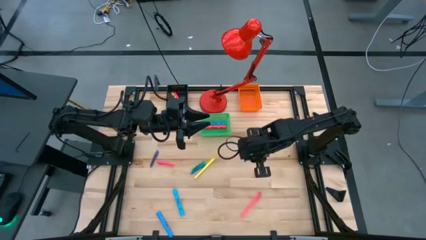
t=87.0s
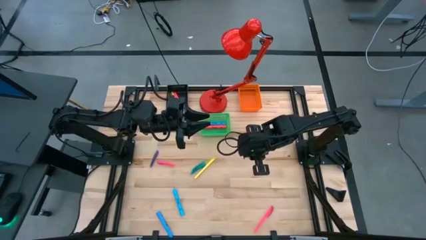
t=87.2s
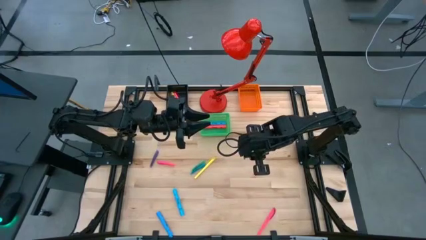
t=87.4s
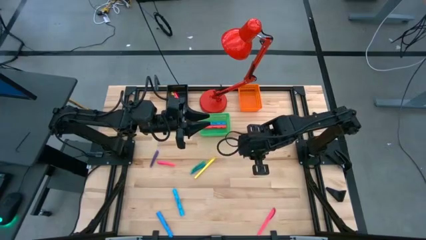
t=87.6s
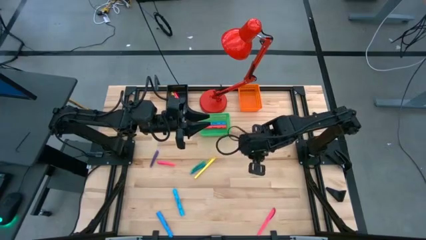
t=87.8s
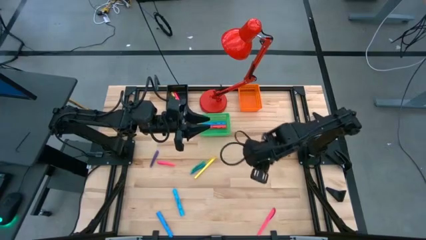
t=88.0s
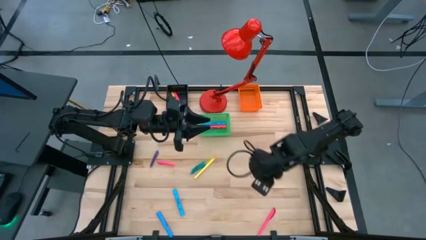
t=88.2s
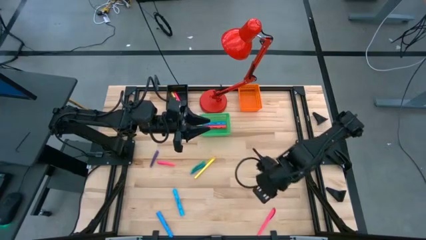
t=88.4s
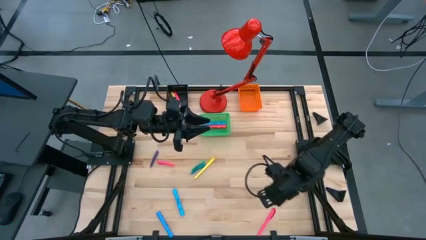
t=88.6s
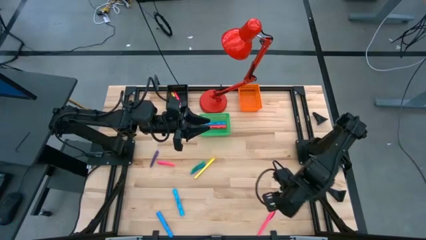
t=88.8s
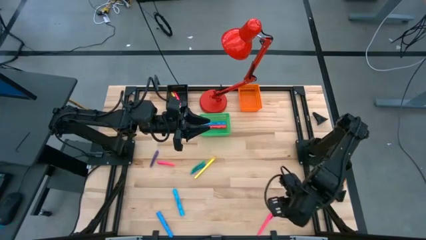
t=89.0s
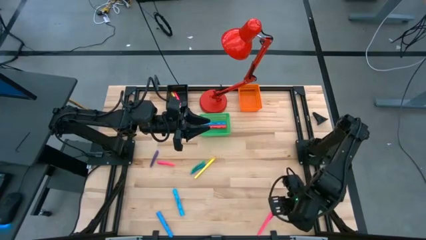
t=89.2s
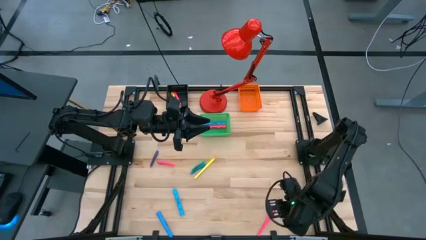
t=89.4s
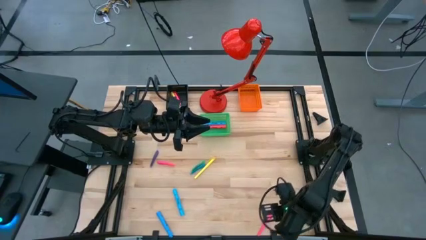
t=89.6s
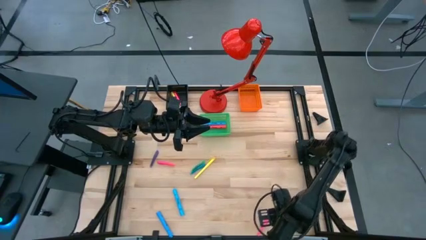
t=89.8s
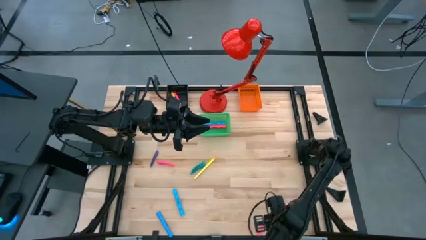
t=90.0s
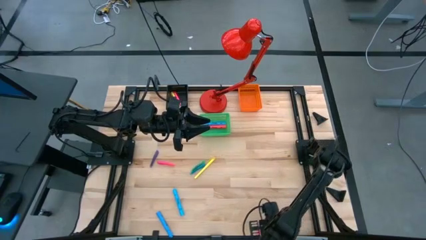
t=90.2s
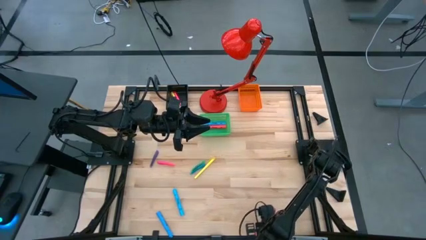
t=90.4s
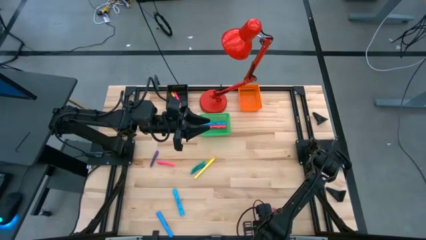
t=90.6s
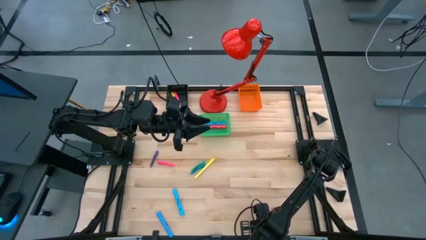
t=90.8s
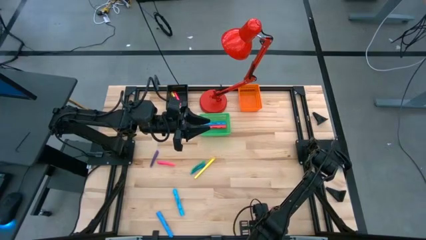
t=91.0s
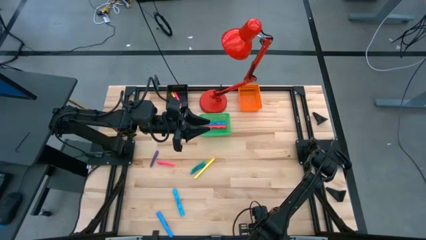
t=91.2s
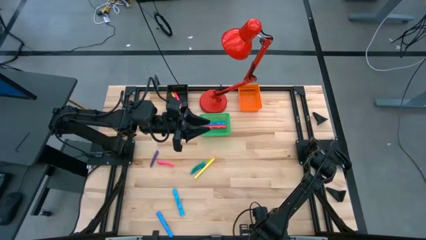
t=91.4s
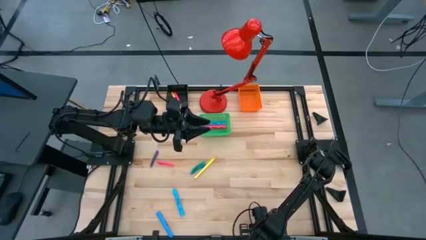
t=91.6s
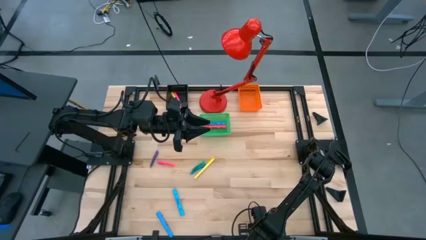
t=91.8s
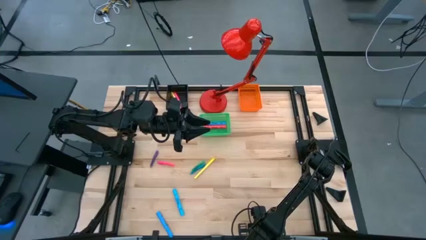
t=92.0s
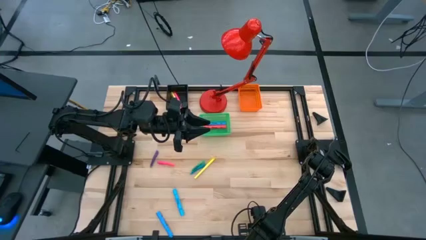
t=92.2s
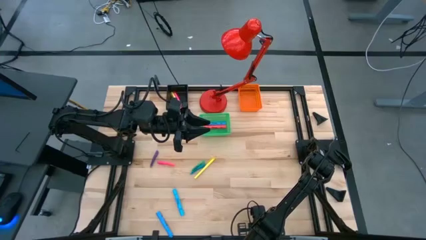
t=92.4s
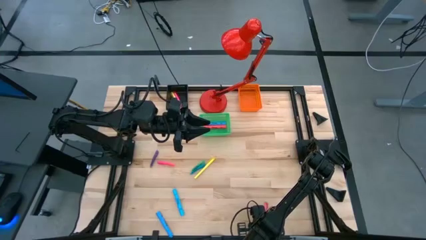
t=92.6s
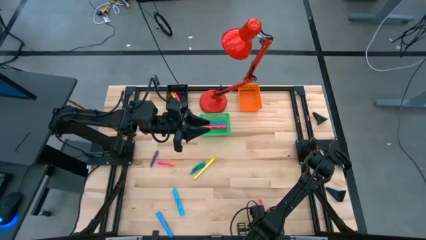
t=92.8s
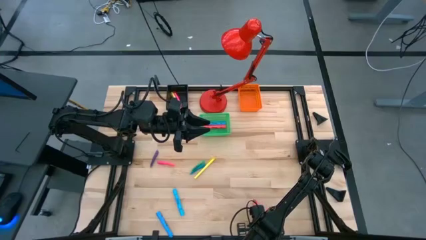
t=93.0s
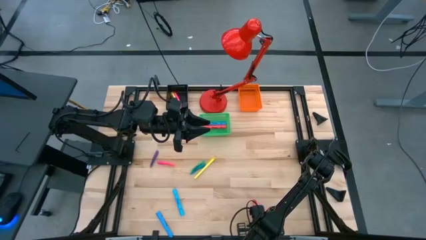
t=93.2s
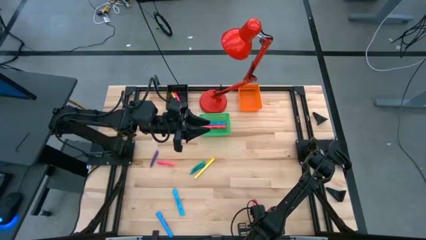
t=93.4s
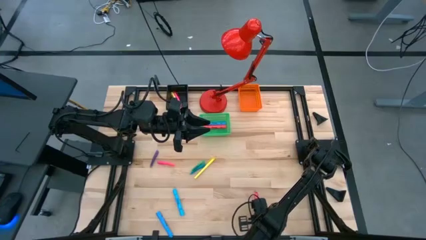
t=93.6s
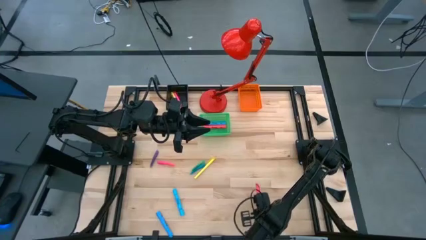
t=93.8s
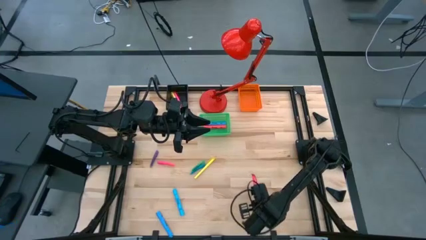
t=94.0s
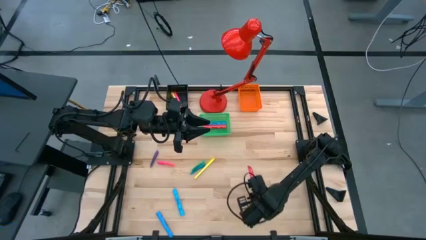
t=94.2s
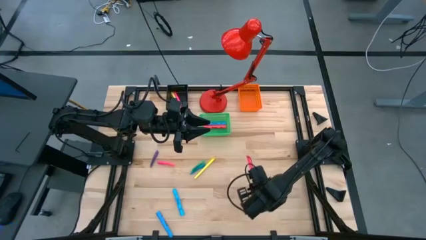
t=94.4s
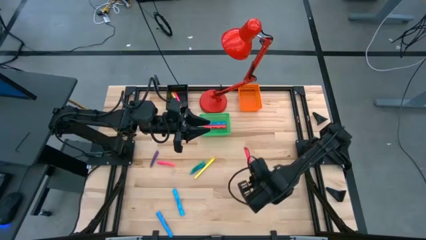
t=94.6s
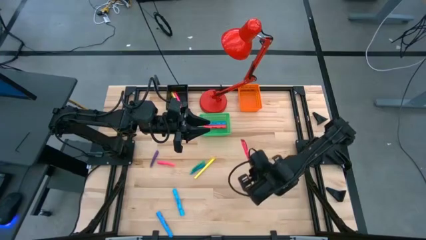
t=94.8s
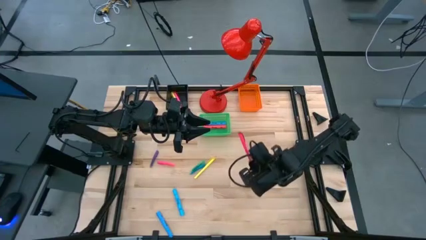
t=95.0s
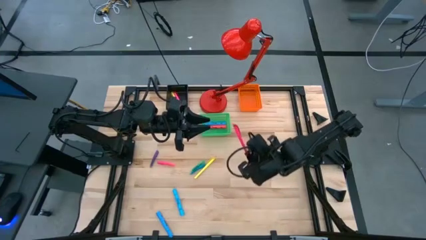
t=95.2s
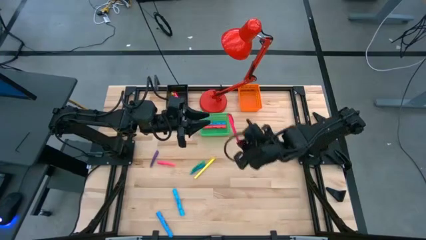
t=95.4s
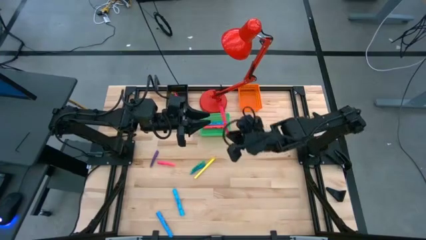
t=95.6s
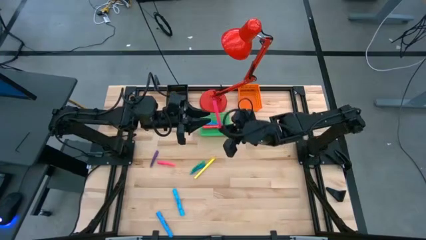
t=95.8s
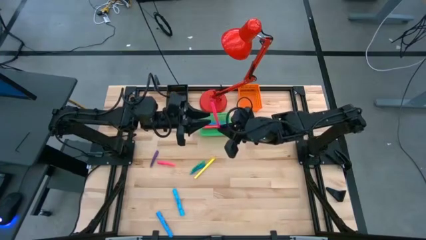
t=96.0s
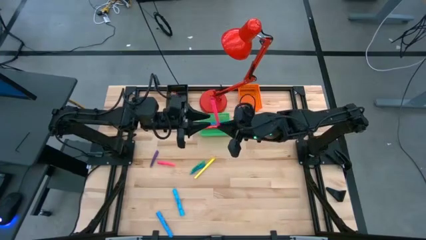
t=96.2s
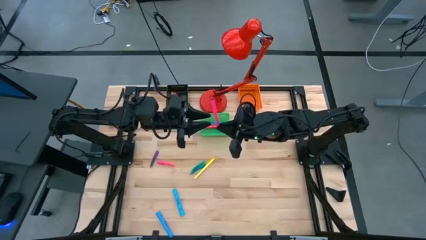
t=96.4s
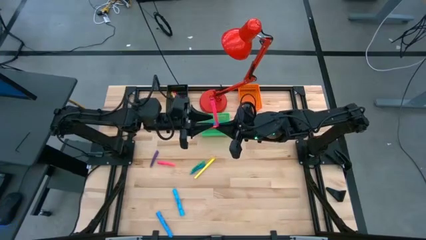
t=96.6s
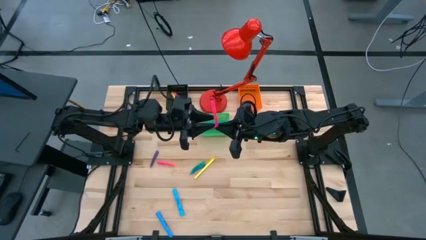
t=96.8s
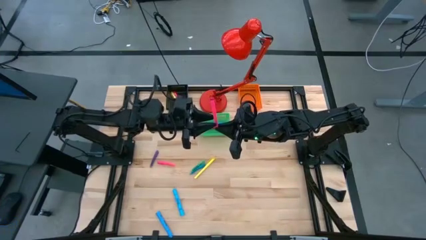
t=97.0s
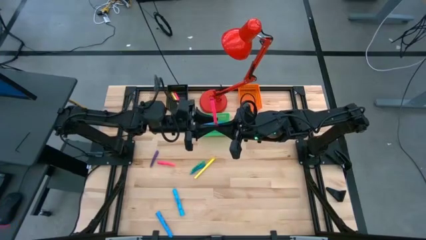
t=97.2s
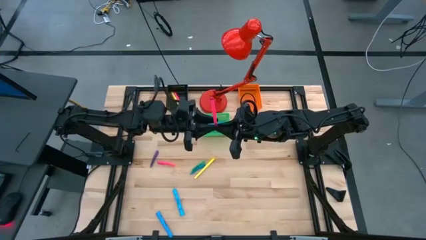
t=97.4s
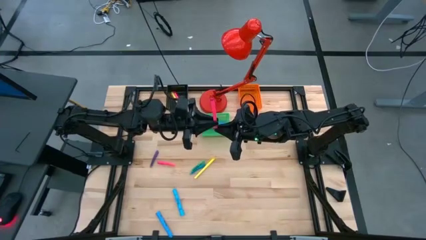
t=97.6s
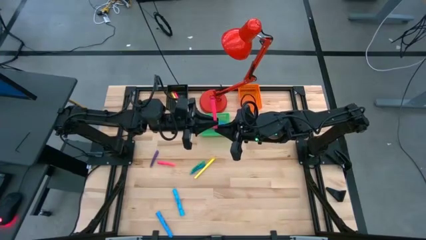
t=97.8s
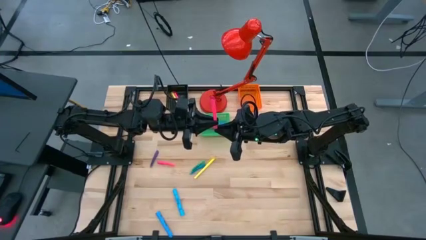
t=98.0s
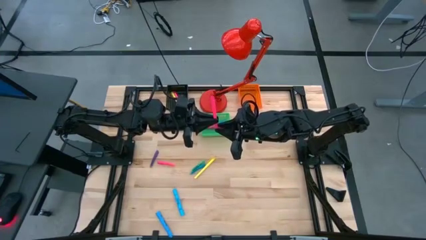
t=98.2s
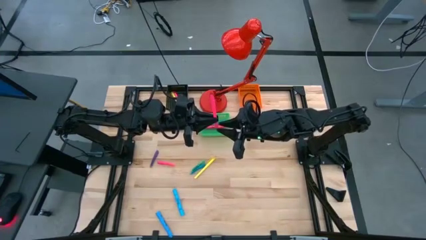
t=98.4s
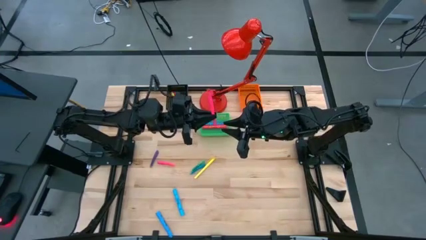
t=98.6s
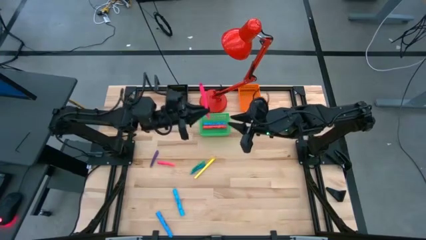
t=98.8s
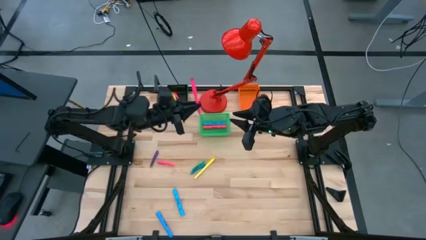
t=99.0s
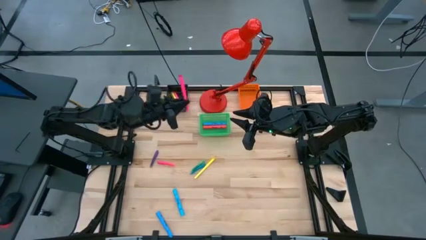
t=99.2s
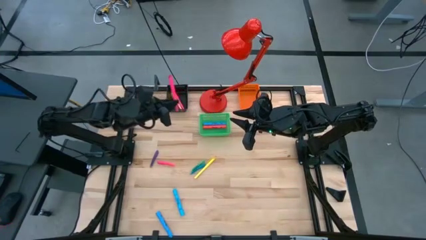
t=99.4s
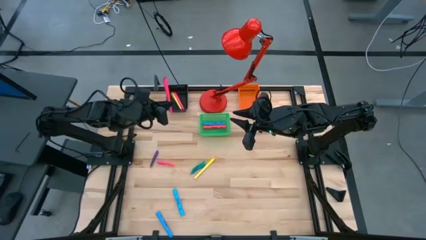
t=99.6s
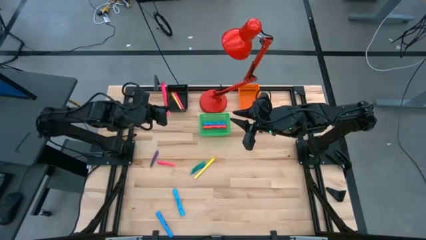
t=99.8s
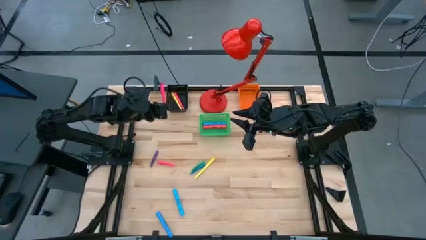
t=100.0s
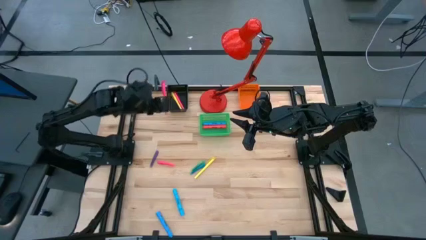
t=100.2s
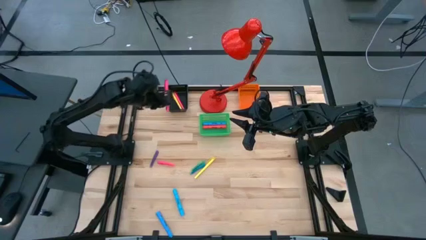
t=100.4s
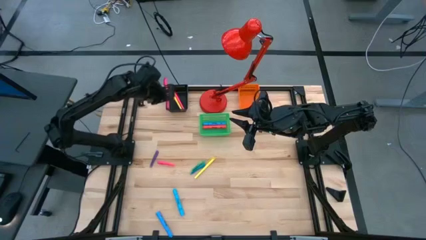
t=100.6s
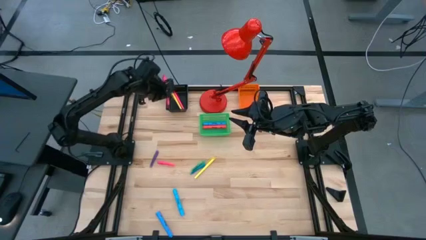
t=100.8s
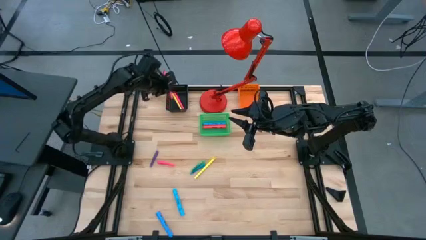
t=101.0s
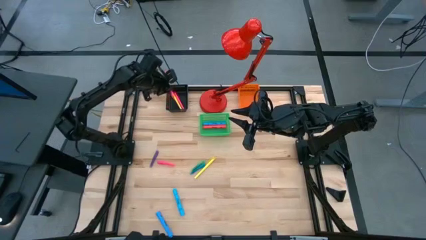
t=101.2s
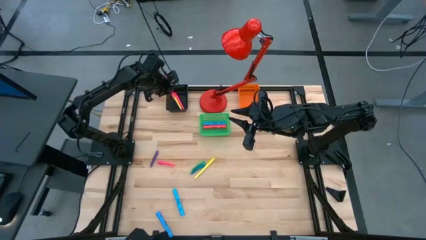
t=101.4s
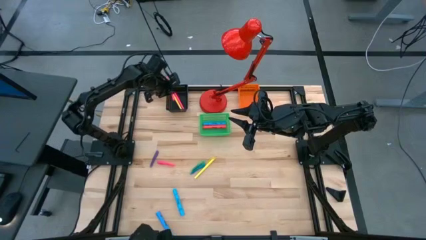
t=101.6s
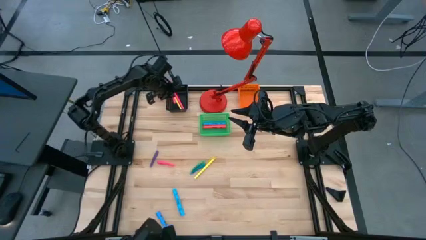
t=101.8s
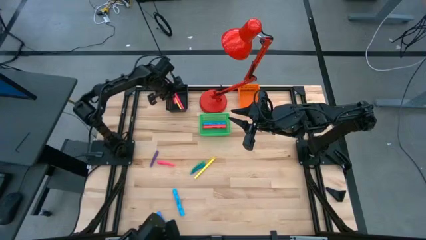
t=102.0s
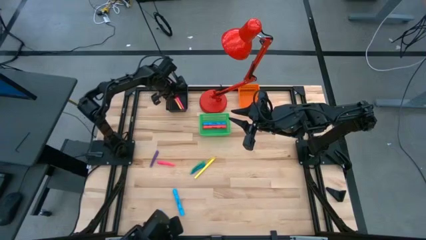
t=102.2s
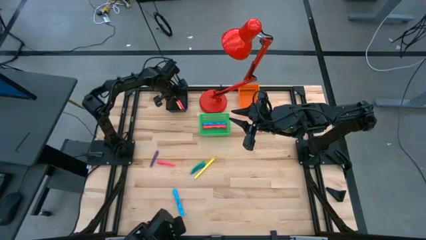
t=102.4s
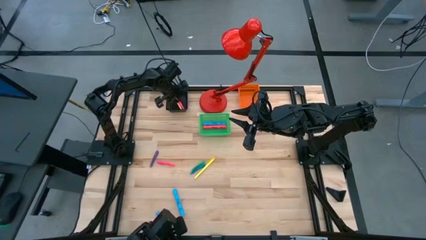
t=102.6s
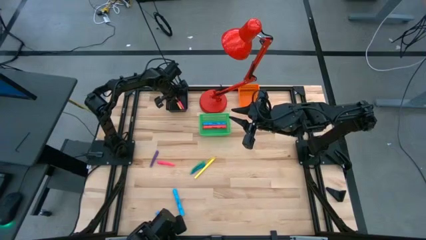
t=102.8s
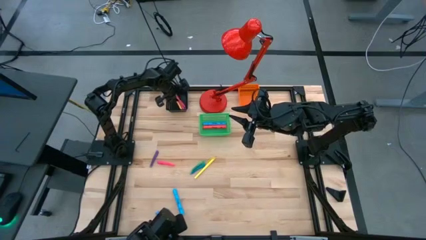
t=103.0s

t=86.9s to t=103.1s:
Task: Pick & Place Markers
Put the pink pen into the black basket

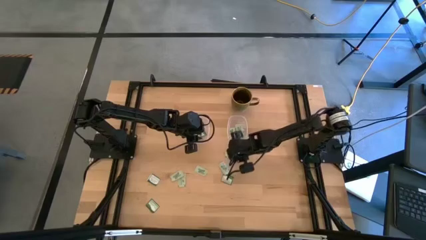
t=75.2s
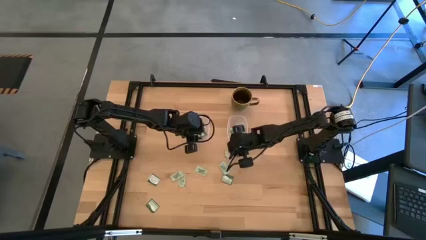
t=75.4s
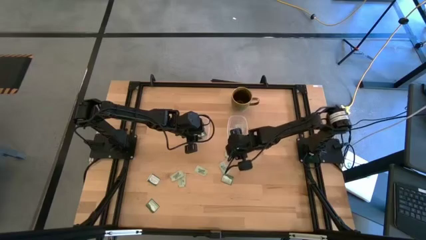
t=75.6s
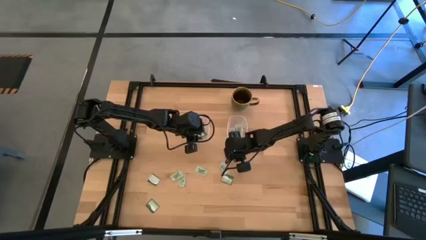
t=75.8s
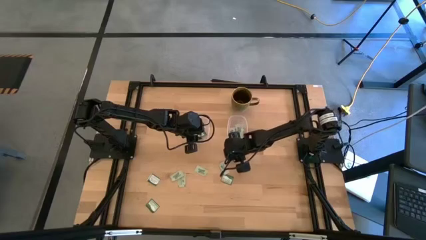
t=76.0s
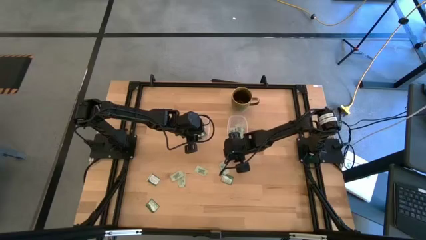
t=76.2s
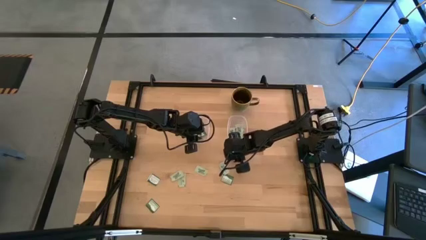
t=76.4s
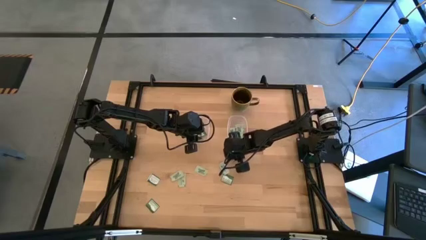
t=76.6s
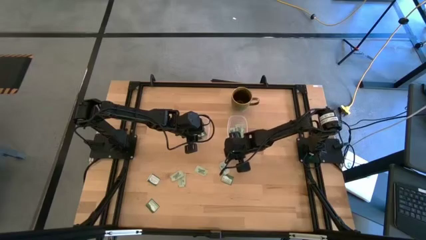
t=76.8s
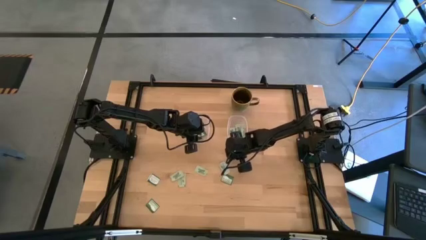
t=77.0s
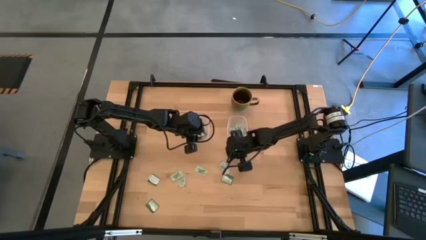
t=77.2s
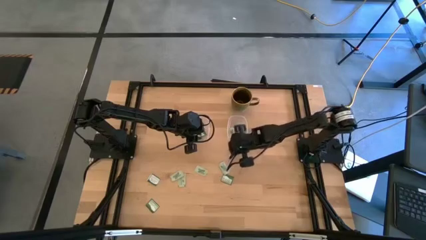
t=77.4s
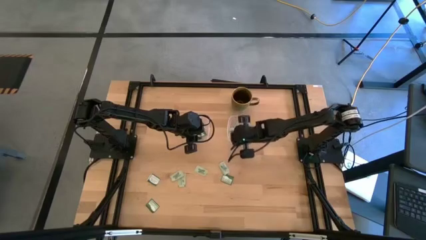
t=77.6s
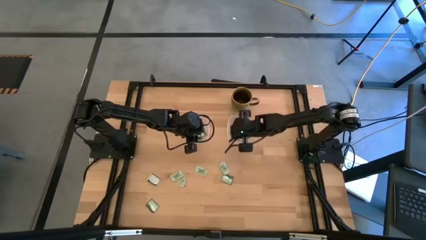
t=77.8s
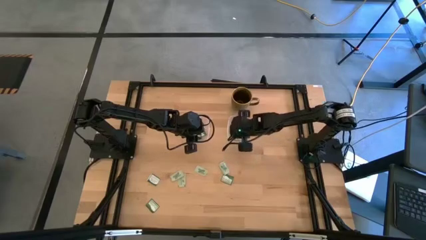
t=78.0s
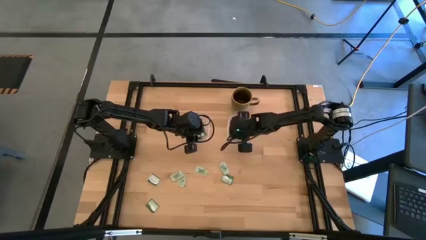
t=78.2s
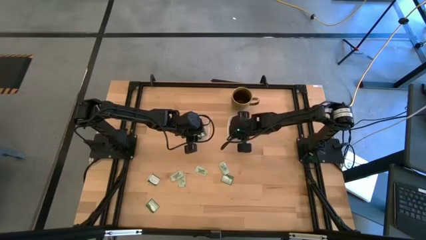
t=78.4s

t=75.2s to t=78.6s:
Task: Pick and place items into bin
Put the stevia packet into the right transparent bin
